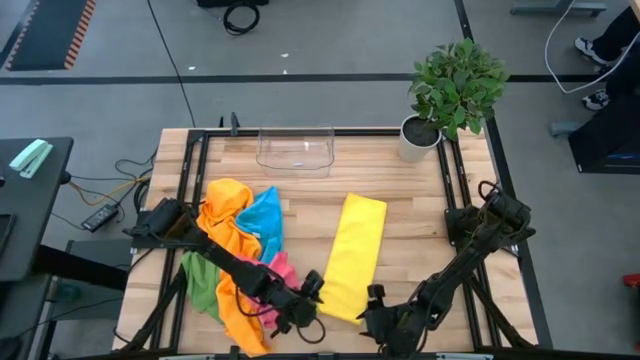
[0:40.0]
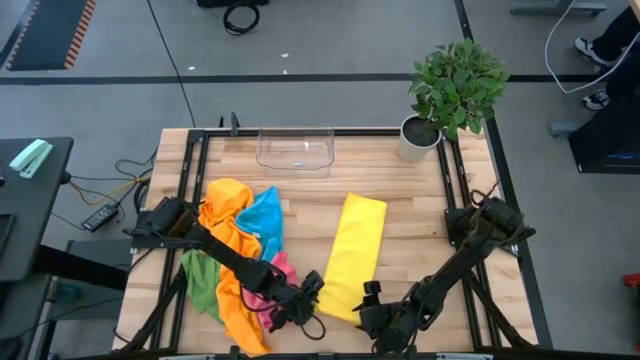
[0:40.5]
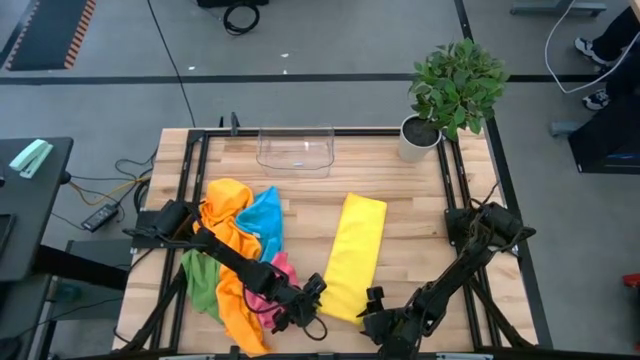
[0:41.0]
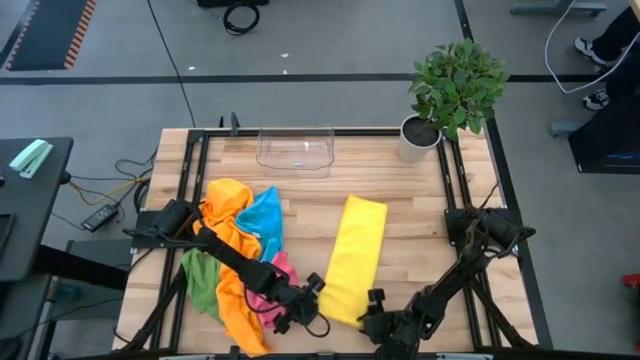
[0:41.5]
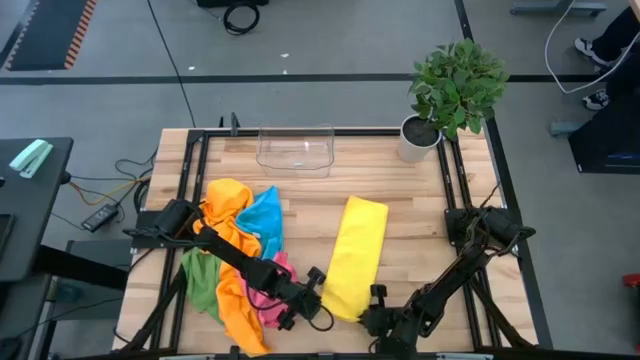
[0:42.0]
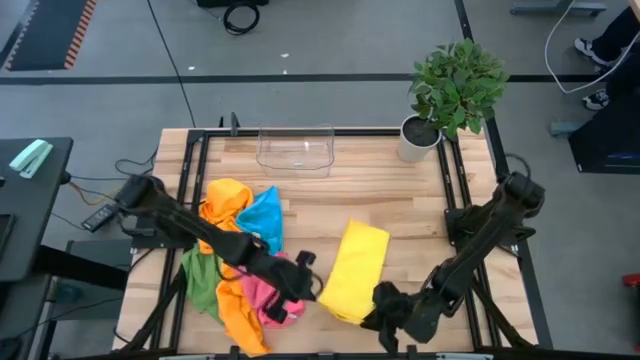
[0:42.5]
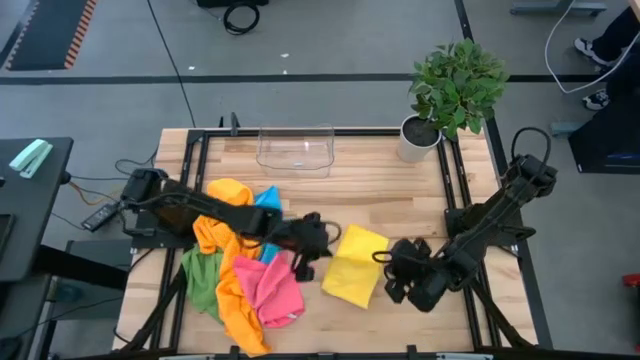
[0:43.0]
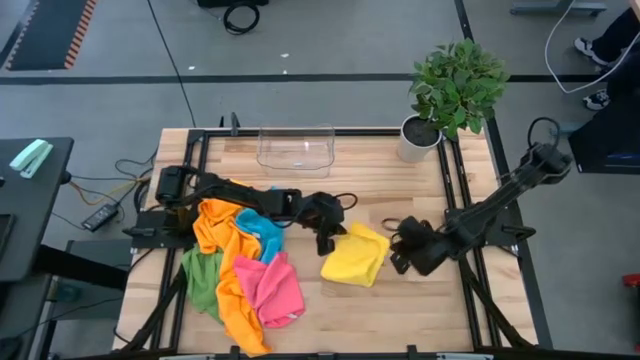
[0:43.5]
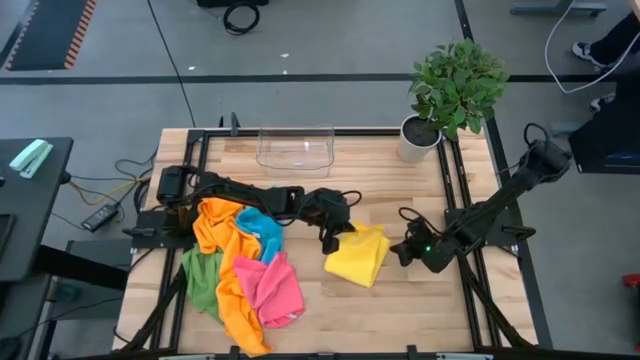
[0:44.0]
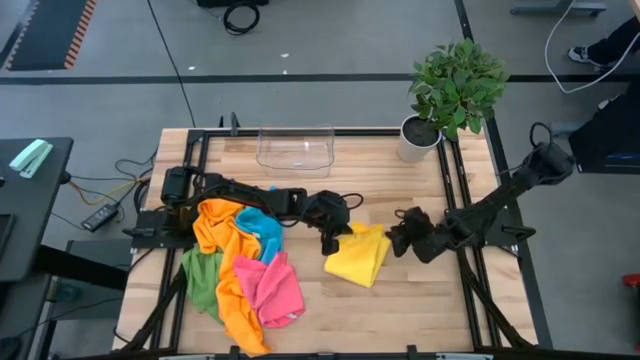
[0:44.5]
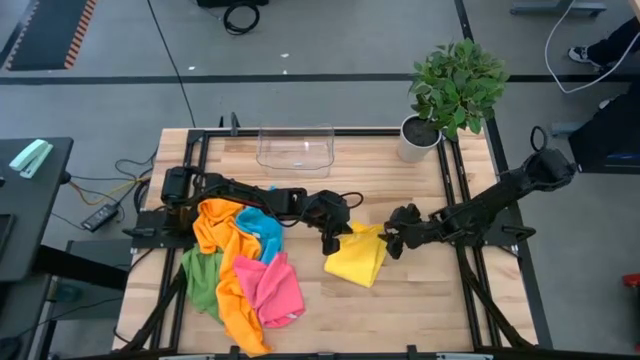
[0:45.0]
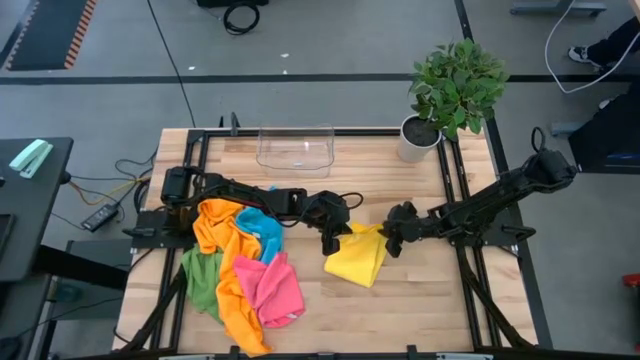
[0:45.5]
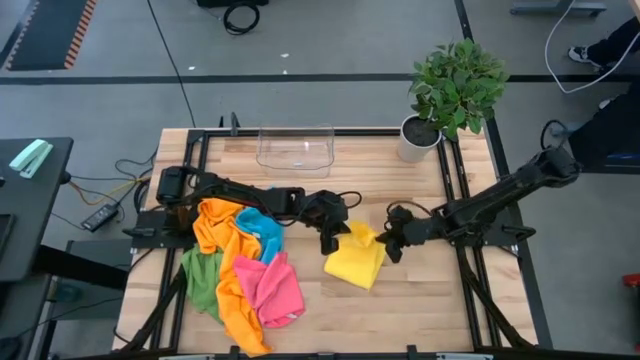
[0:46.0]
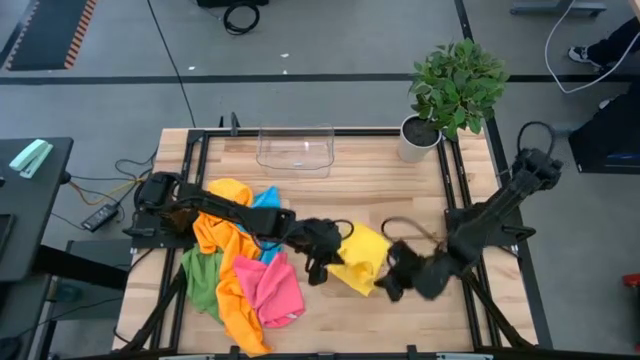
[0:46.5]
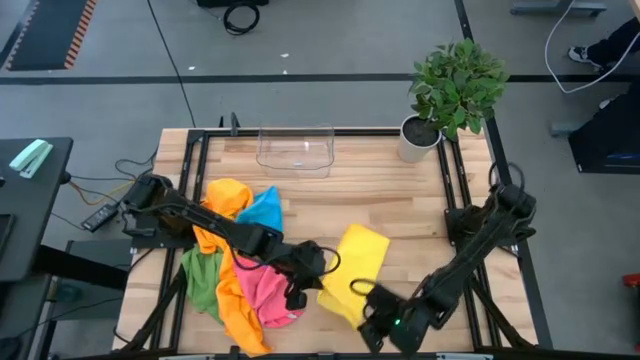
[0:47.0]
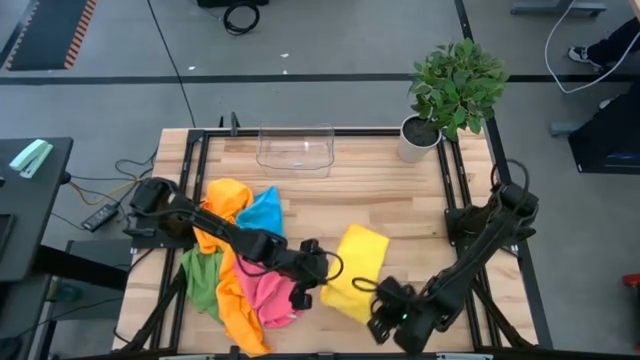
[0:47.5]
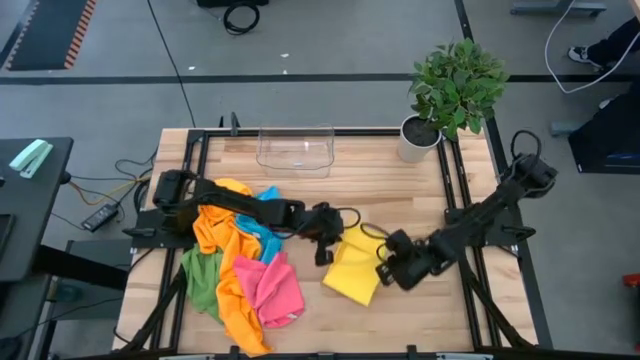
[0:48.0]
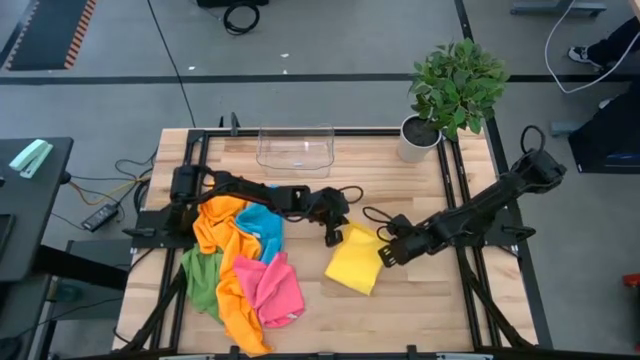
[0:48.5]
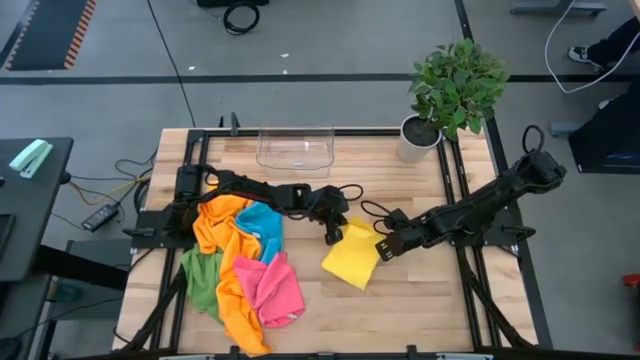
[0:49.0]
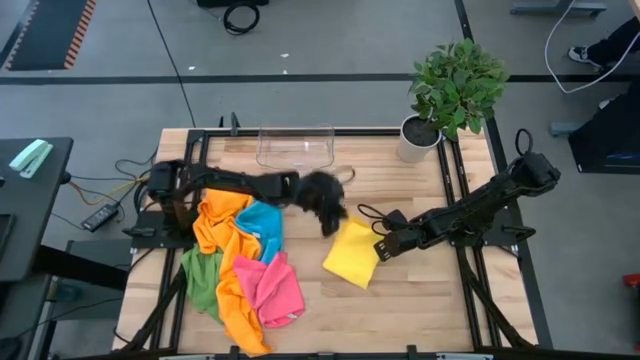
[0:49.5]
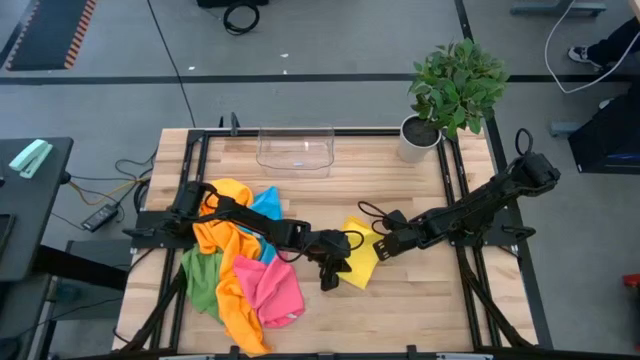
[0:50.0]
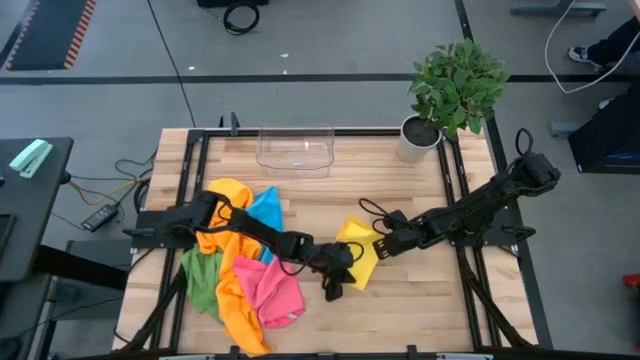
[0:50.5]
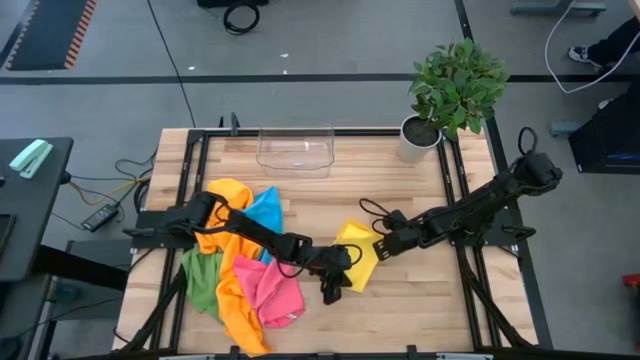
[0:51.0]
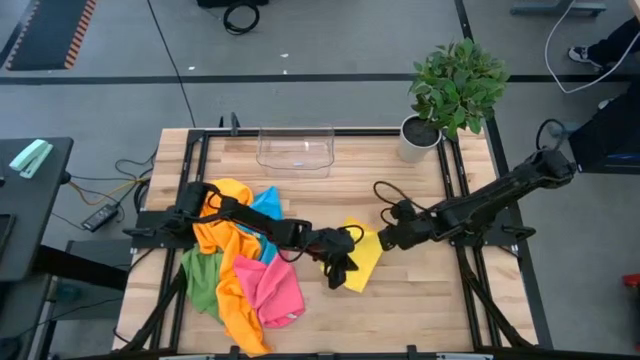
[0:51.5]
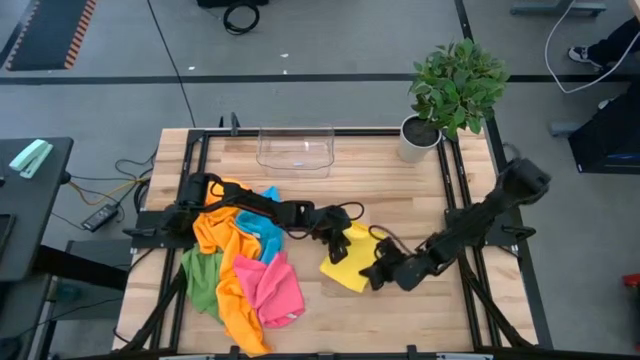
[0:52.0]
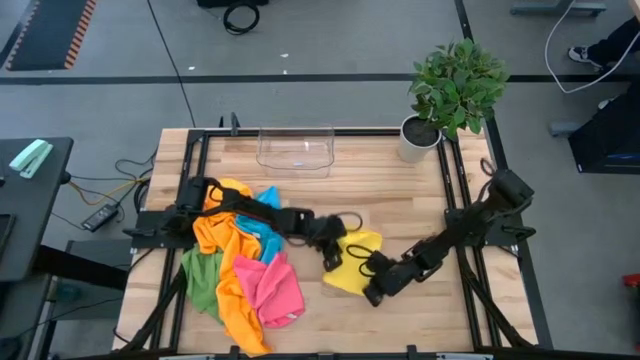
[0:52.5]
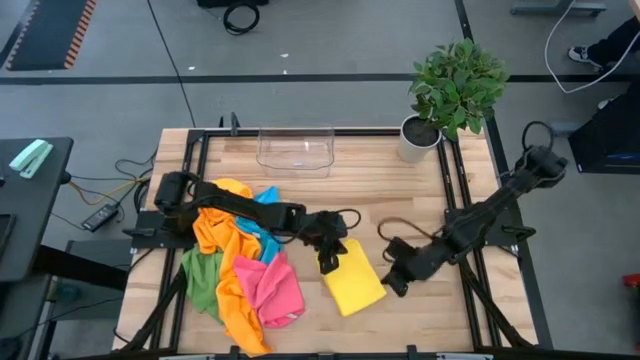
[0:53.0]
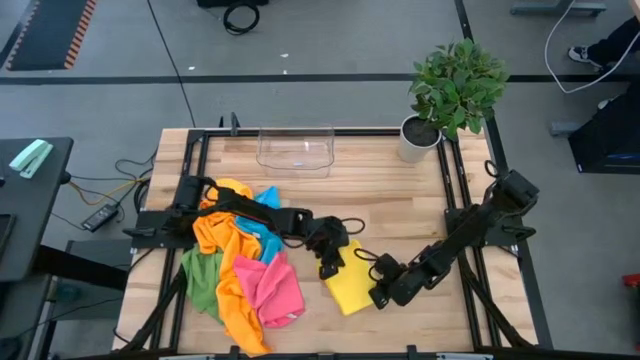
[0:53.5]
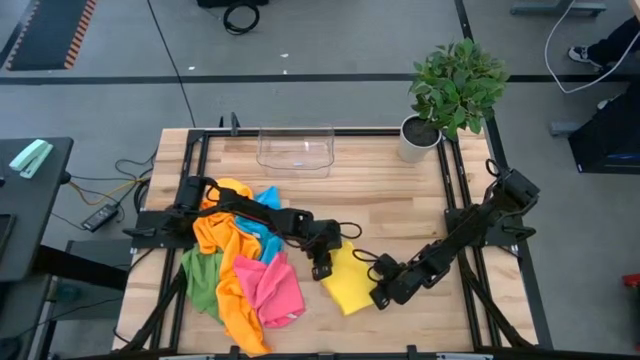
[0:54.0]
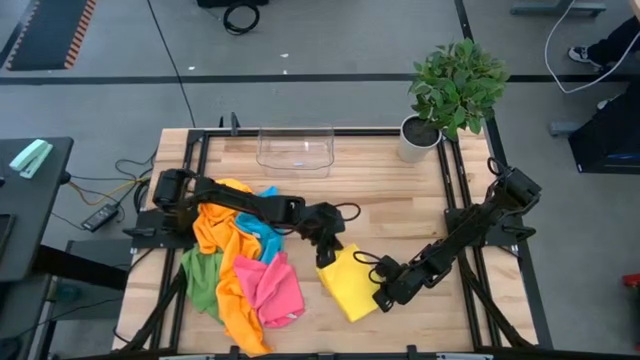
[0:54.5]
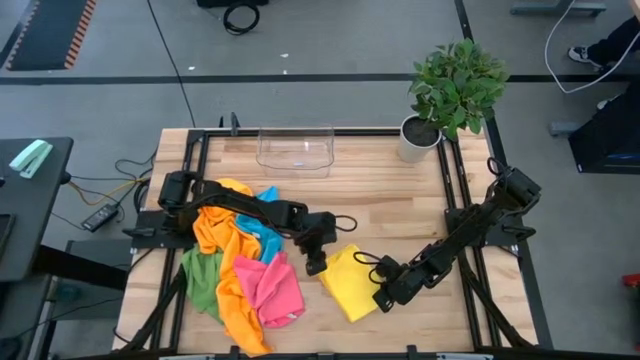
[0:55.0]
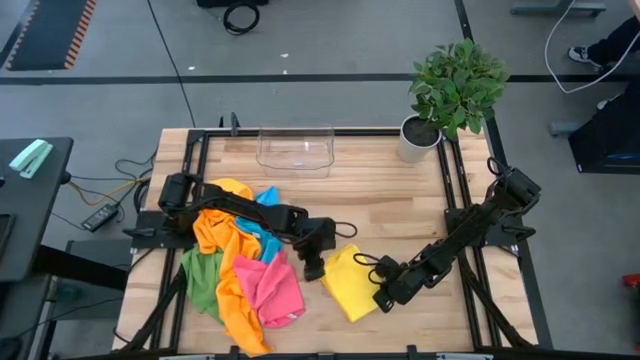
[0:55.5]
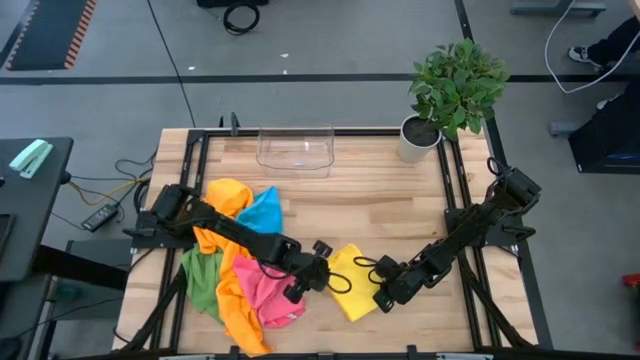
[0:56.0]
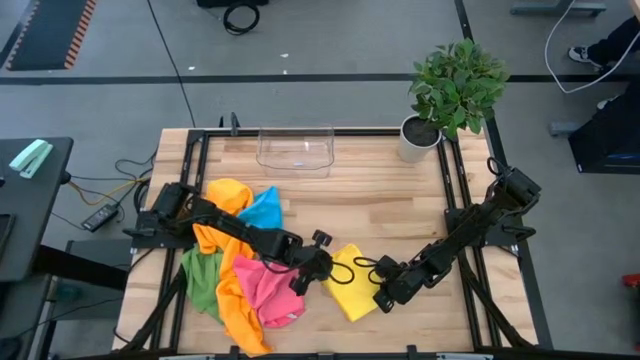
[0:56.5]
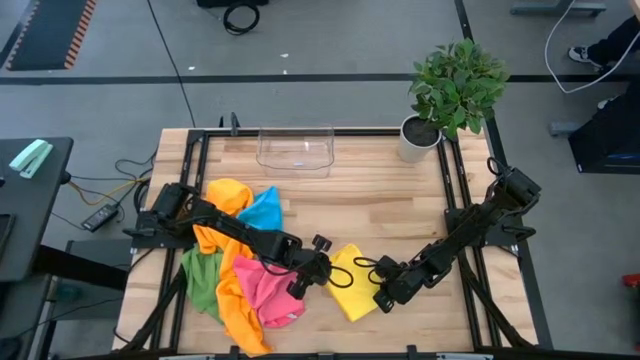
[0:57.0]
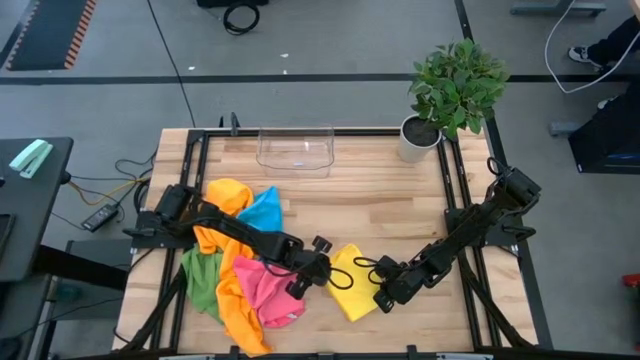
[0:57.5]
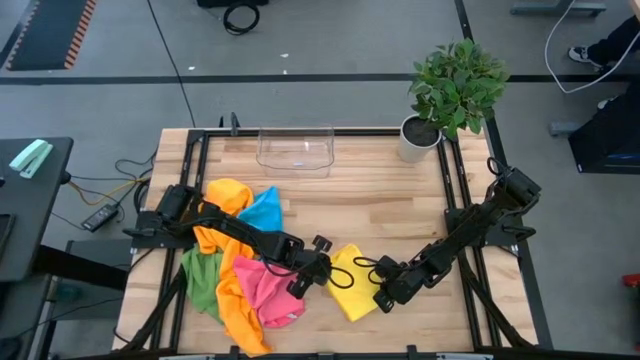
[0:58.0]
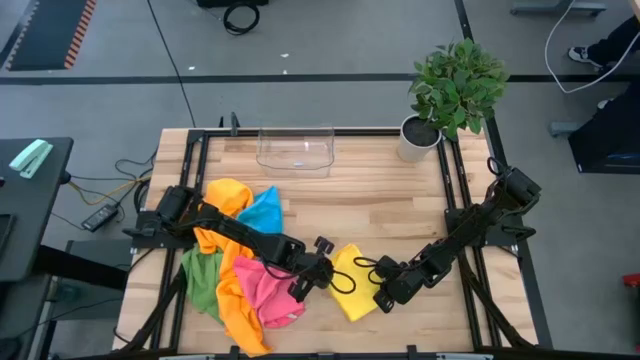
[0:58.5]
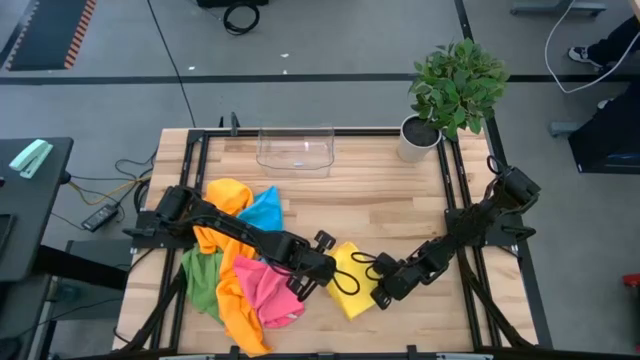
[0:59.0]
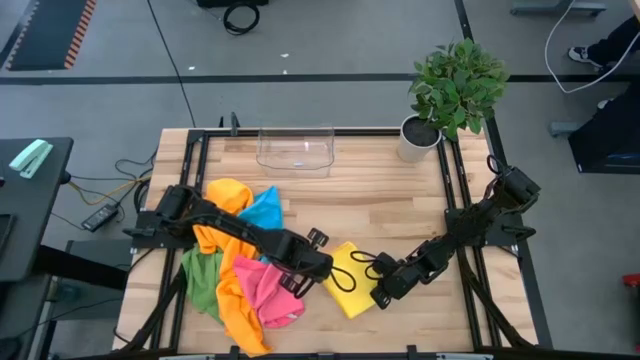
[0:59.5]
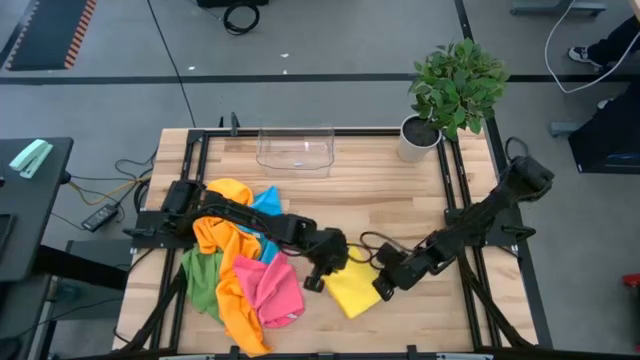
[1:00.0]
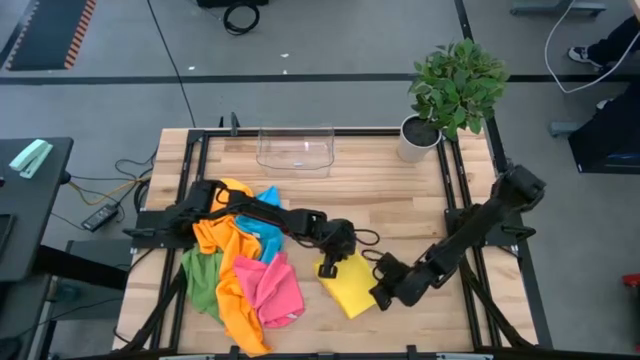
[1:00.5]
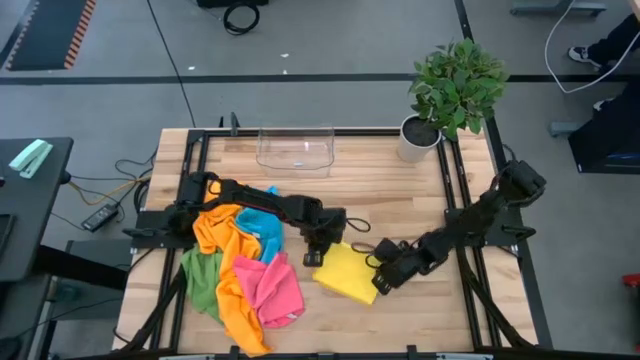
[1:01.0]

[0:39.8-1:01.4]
Task: Fold microfiber towels
Fold the yellow microfiber towel
